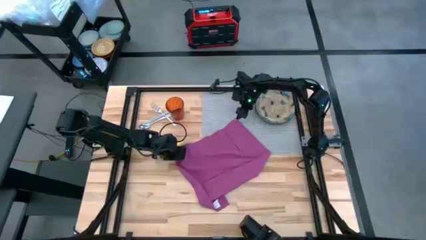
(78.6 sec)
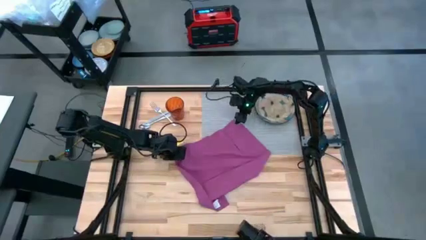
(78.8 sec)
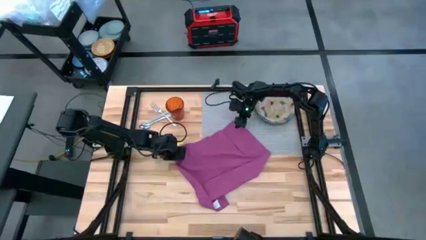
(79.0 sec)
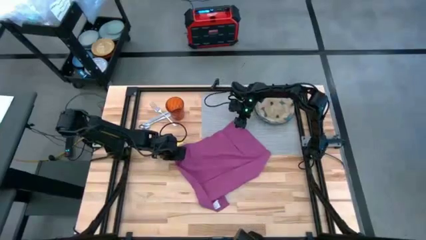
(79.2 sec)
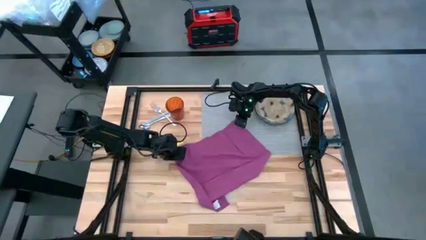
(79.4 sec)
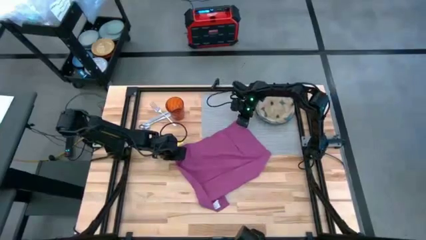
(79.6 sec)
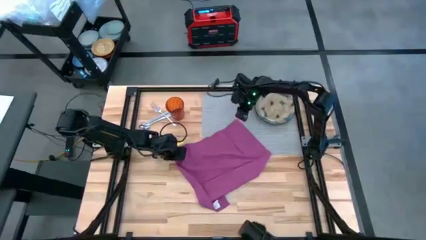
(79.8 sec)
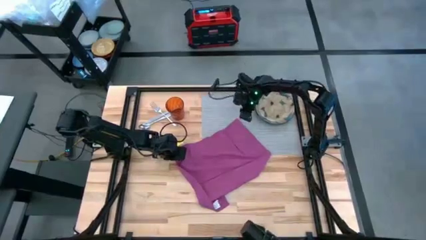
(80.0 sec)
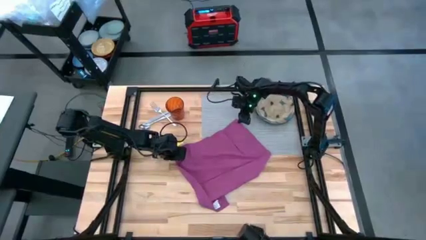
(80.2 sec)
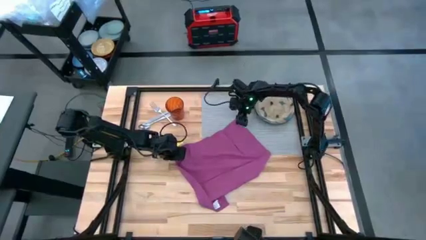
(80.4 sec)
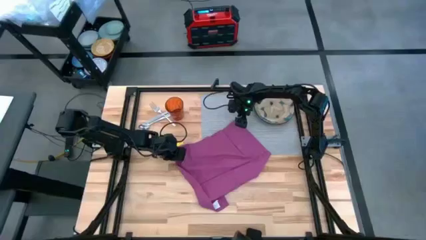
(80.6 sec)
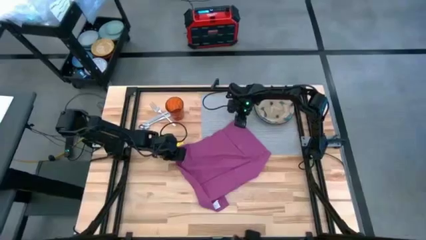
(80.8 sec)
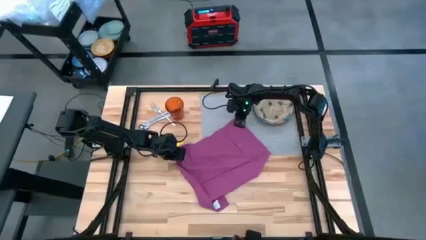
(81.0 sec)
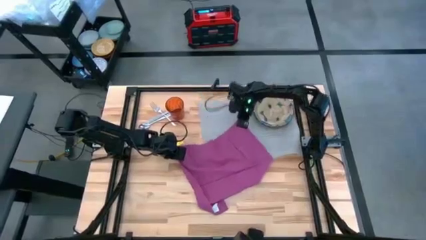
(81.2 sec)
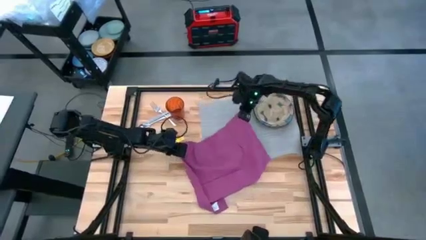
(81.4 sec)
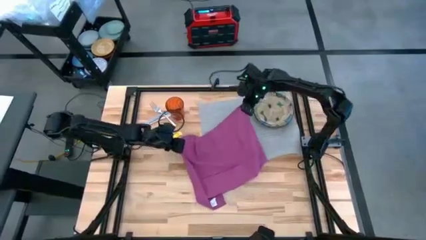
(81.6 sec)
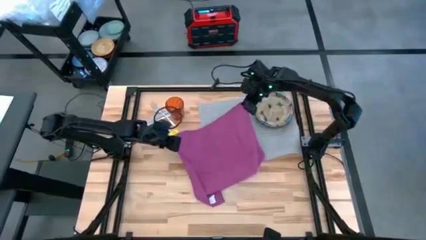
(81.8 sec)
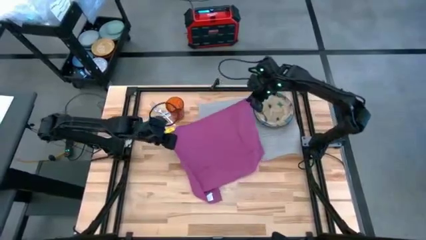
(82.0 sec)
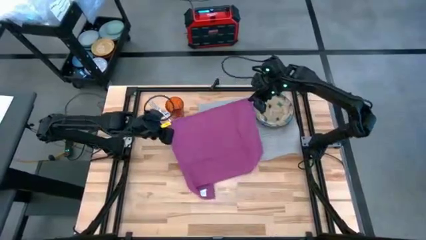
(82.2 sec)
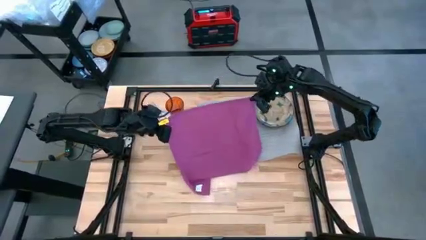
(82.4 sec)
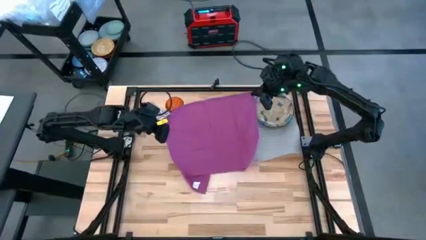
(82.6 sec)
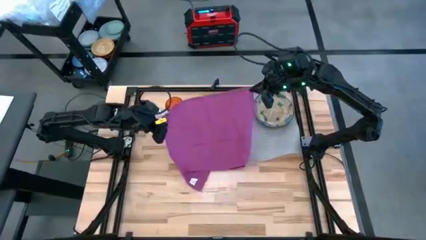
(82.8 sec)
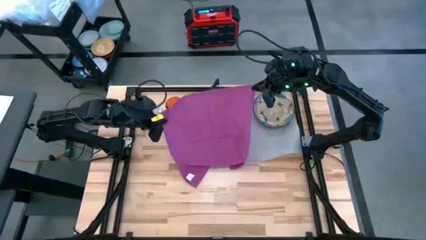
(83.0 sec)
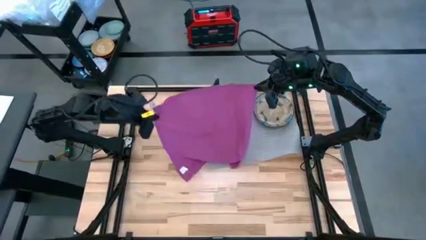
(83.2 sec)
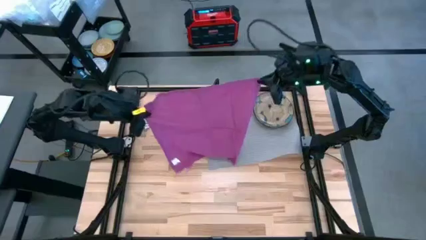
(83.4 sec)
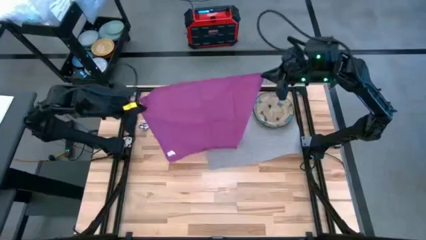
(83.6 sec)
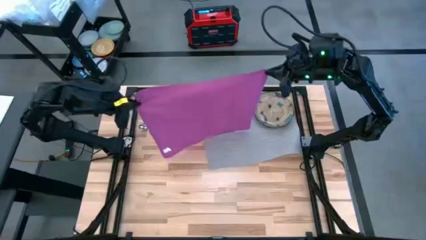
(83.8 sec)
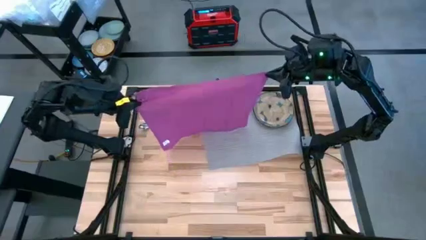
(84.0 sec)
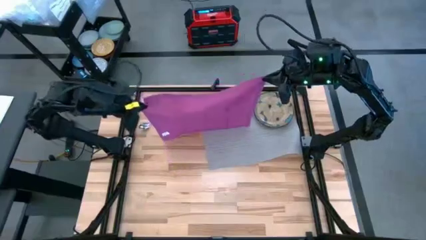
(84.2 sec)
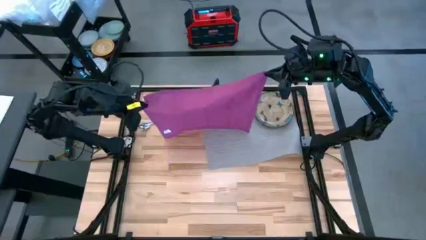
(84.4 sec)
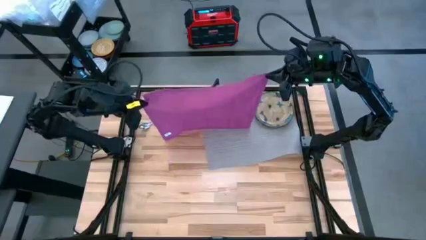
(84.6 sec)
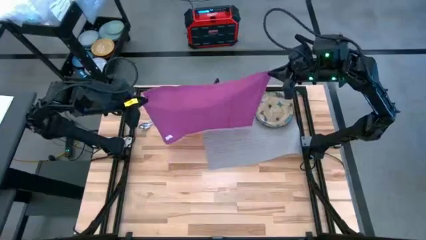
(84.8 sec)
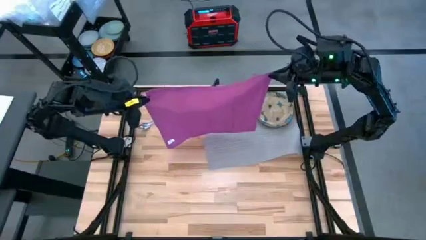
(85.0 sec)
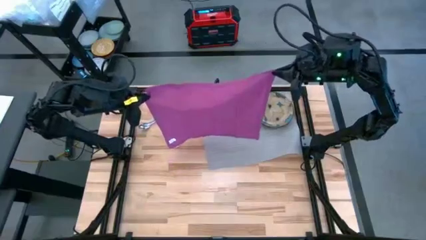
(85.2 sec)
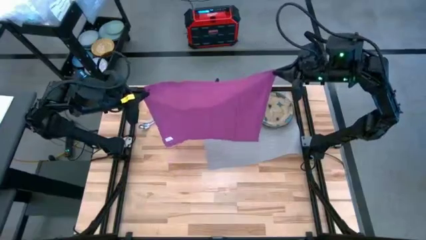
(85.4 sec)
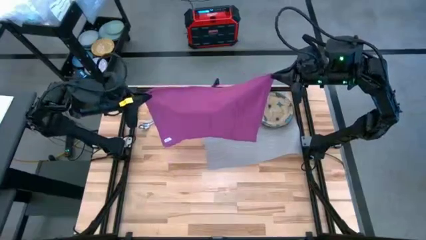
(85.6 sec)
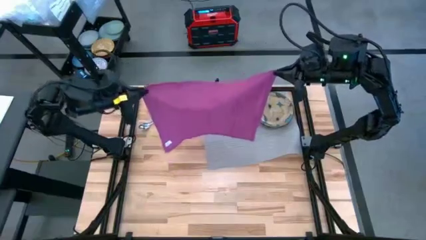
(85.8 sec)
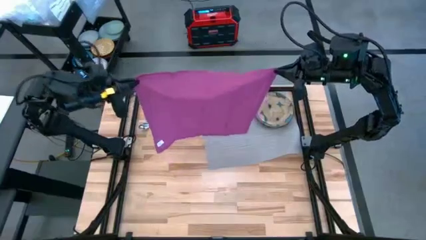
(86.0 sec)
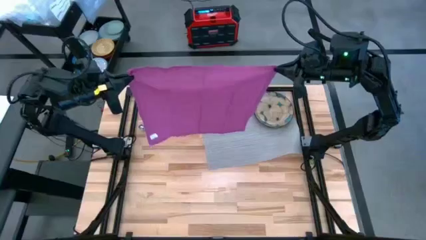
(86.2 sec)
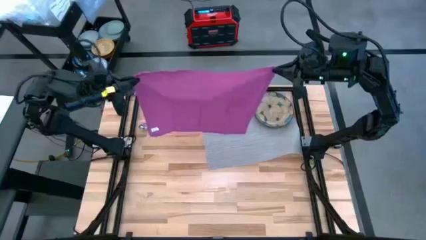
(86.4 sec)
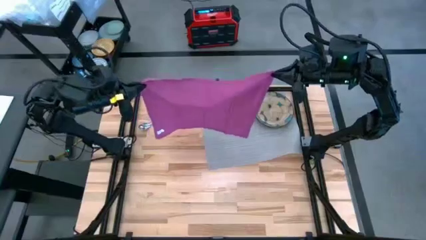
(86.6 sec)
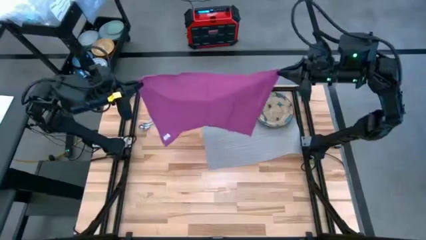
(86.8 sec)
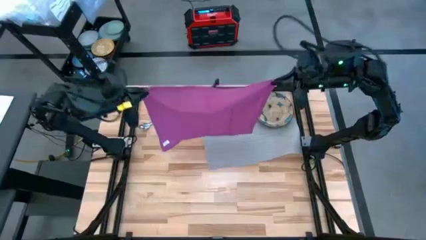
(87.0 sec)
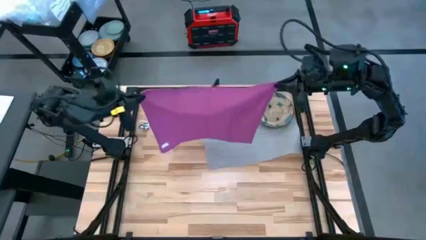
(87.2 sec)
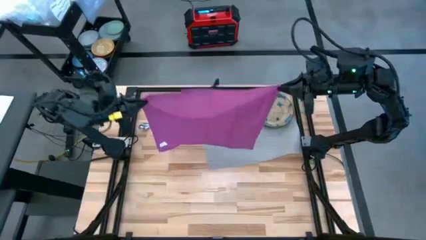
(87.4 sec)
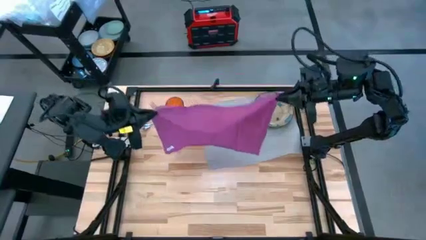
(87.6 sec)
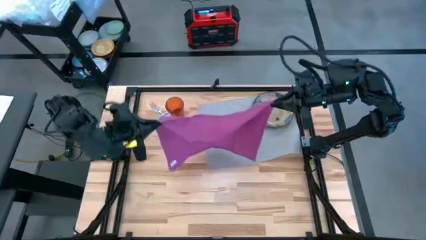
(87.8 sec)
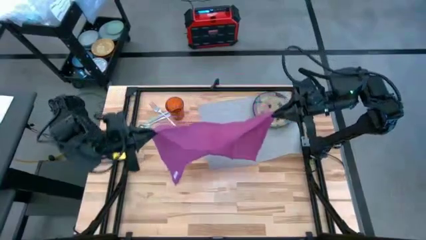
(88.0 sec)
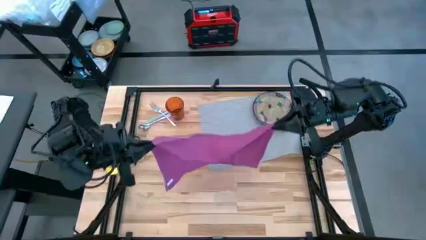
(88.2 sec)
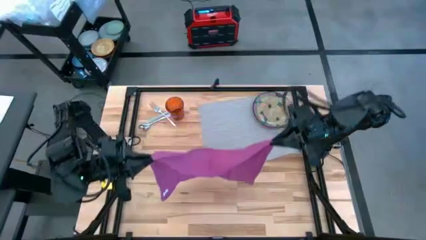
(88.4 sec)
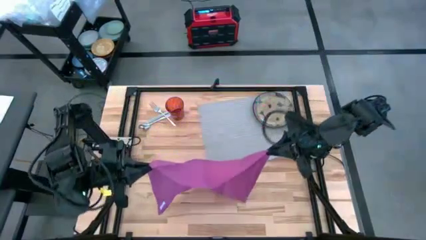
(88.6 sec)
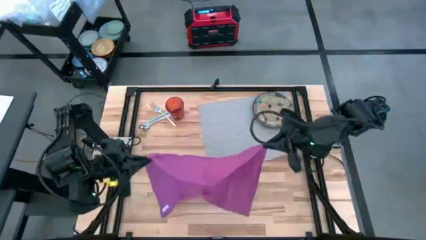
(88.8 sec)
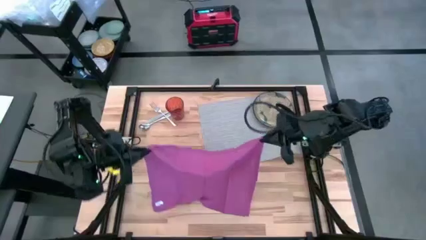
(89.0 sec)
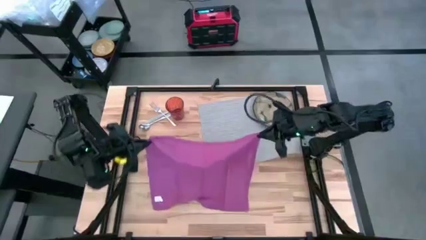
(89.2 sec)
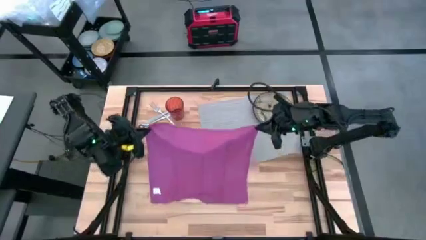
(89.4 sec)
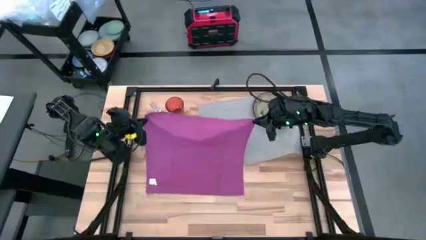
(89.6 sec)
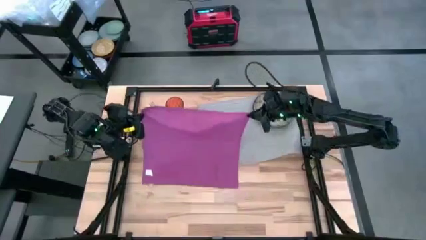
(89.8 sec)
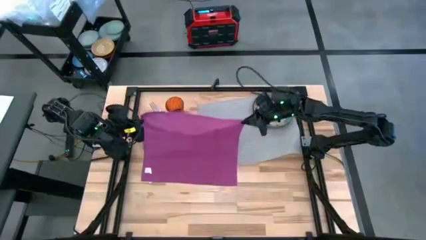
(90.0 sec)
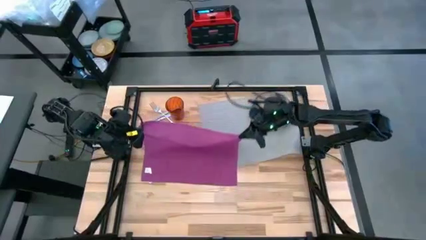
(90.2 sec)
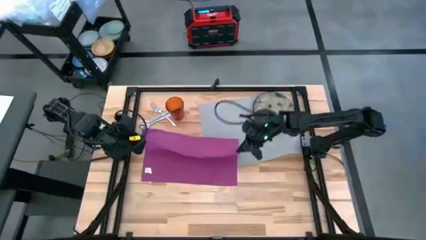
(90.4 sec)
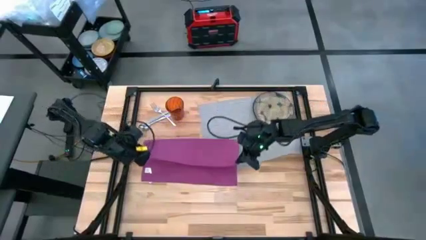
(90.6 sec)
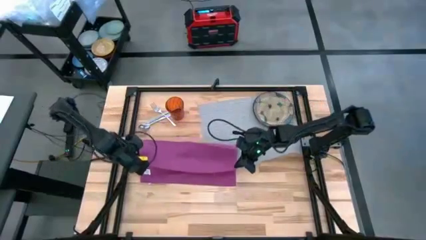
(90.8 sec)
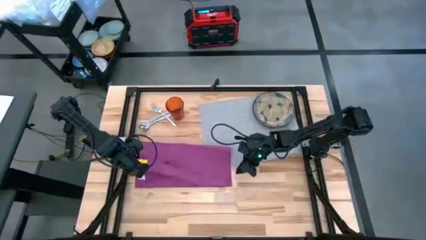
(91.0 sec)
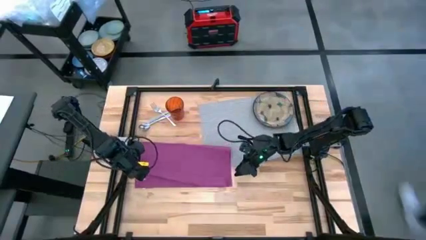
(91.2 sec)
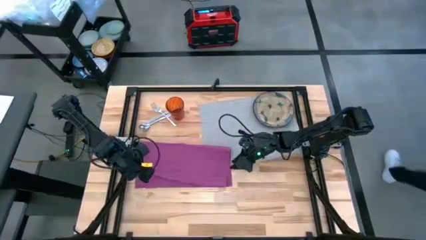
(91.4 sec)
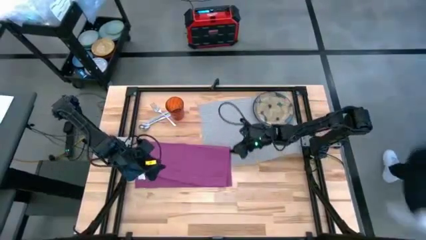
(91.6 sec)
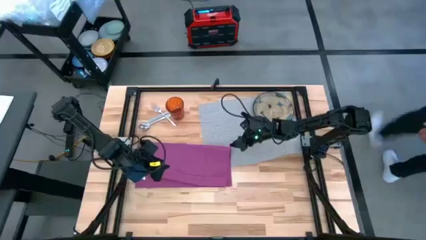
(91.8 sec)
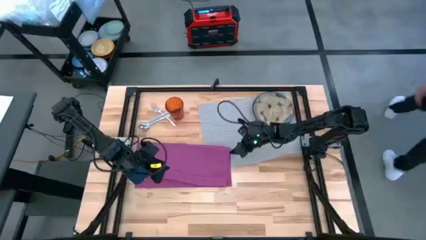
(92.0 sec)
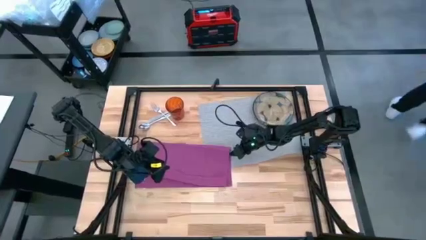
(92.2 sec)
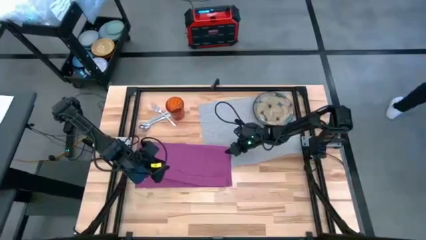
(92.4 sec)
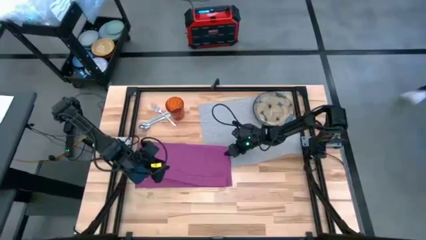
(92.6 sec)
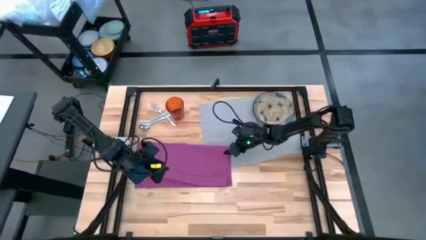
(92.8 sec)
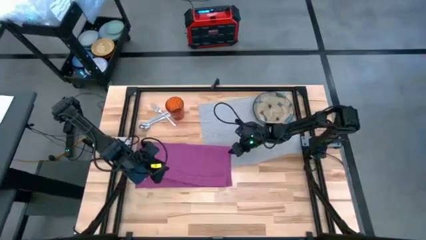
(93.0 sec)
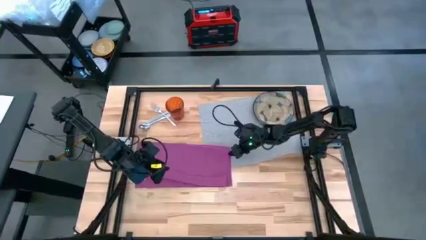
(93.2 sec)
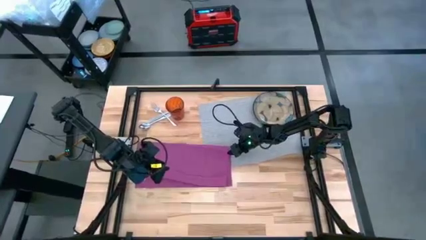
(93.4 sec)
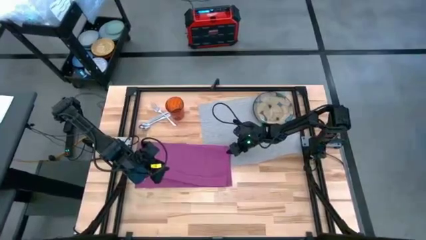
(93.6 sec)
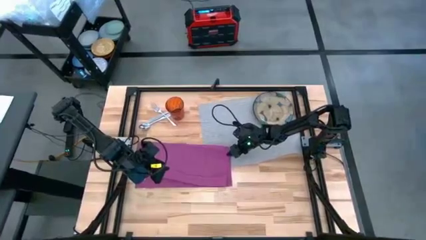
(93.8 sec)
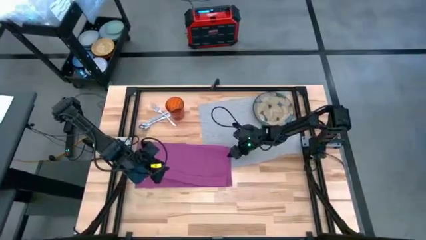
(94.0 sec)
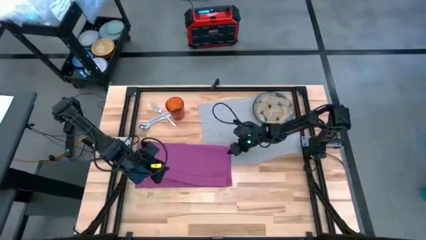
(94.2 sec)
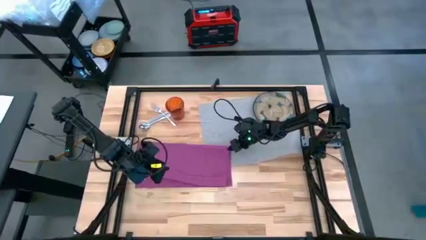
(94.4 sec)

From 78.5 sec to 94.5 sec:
Task: Set table place
Fold the purple napkin
